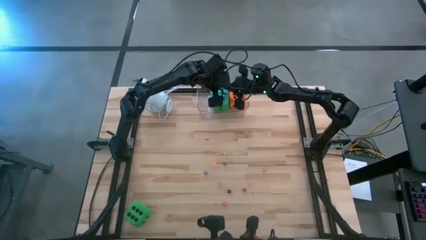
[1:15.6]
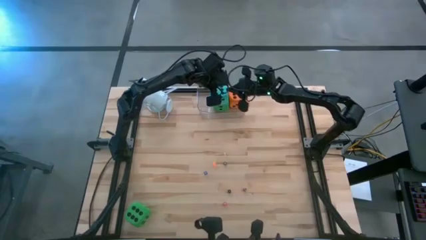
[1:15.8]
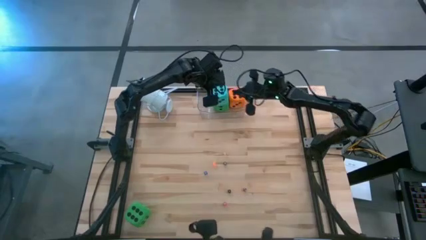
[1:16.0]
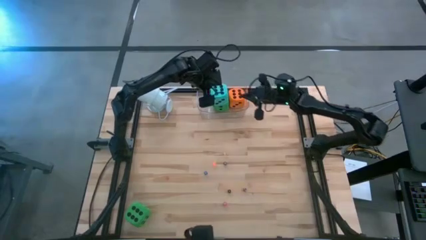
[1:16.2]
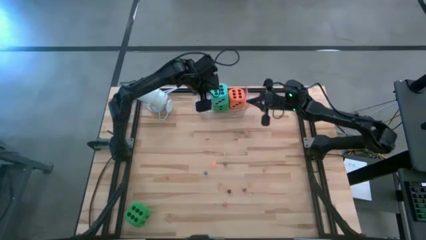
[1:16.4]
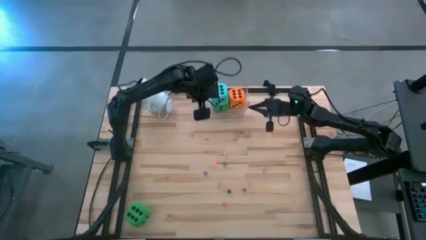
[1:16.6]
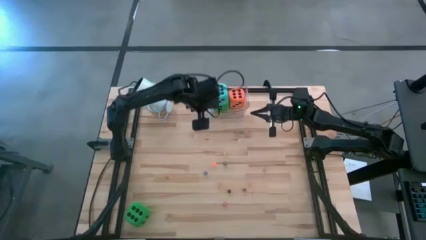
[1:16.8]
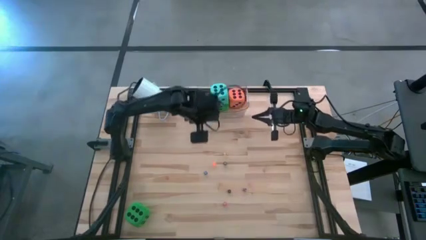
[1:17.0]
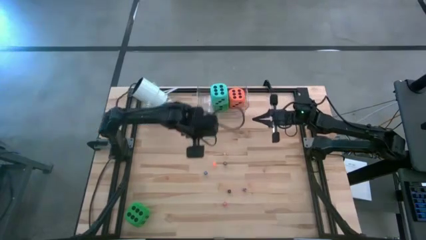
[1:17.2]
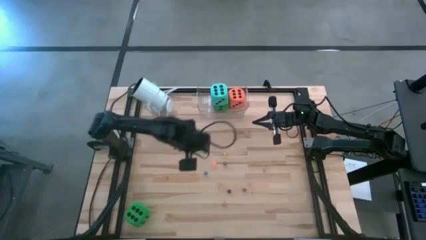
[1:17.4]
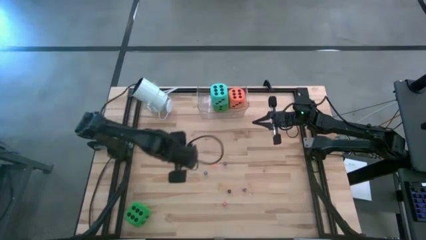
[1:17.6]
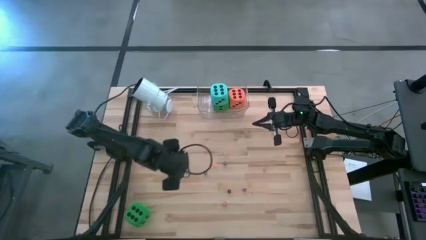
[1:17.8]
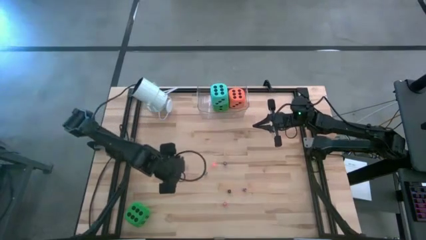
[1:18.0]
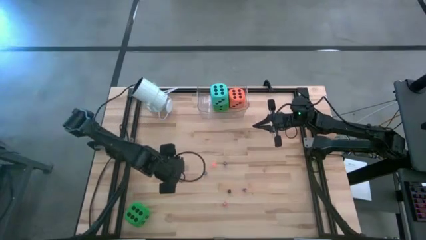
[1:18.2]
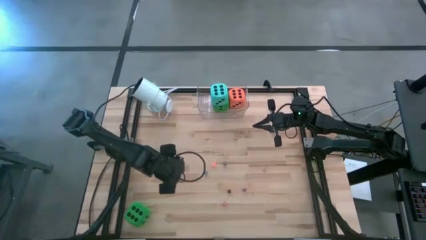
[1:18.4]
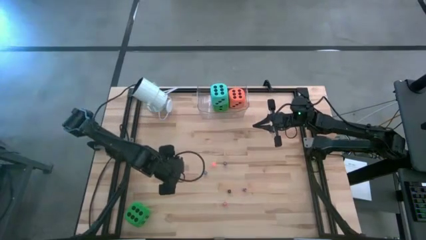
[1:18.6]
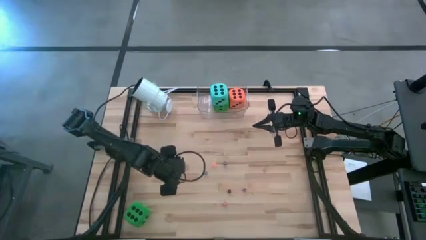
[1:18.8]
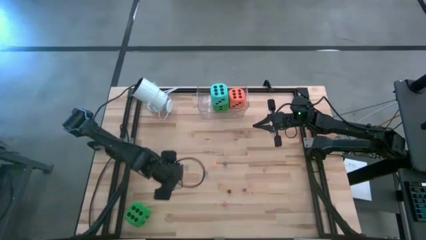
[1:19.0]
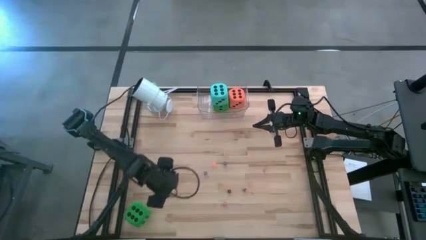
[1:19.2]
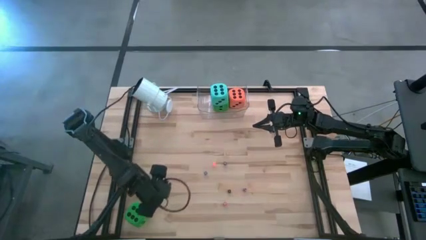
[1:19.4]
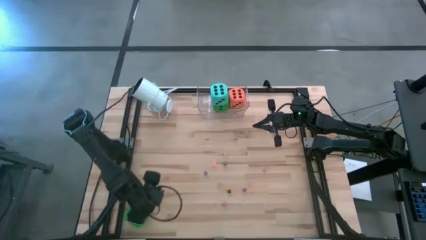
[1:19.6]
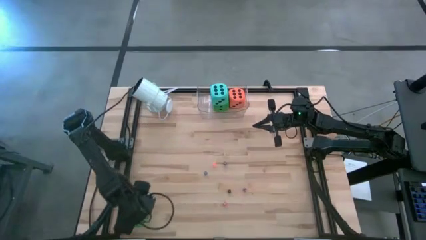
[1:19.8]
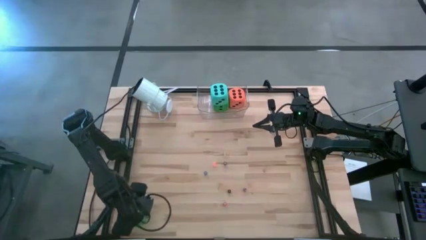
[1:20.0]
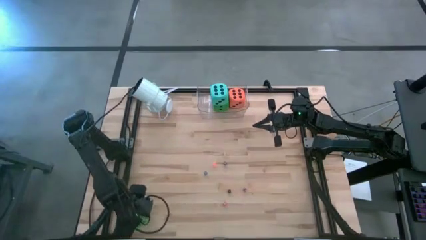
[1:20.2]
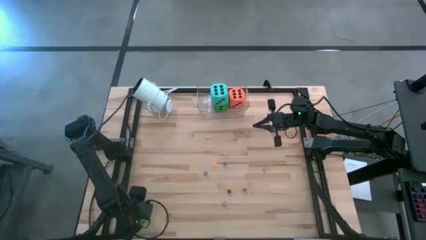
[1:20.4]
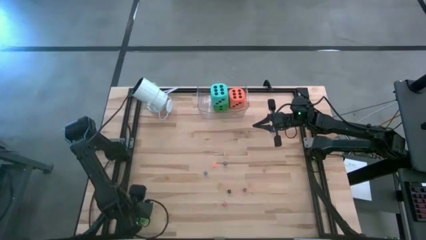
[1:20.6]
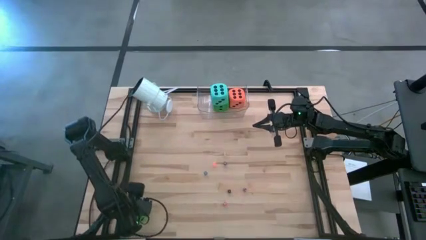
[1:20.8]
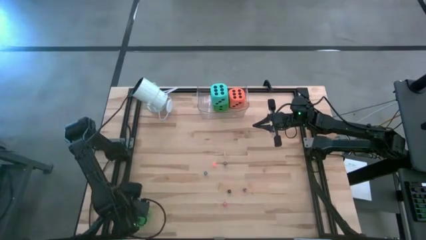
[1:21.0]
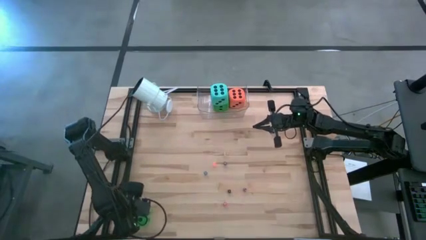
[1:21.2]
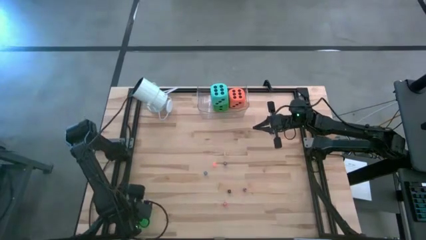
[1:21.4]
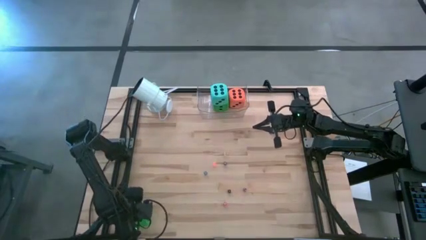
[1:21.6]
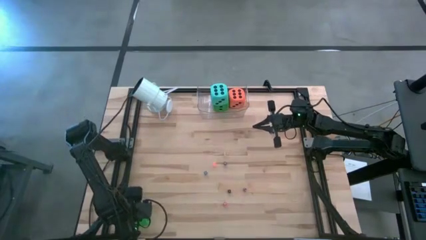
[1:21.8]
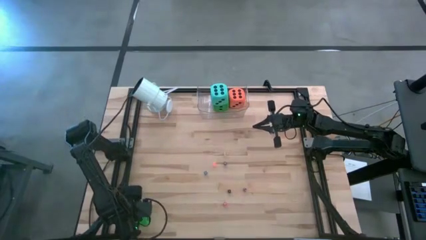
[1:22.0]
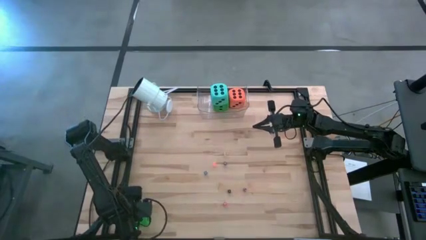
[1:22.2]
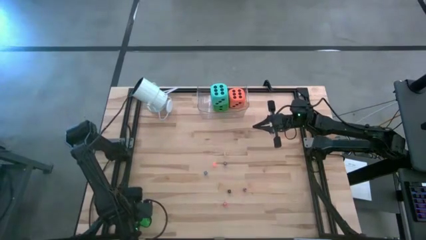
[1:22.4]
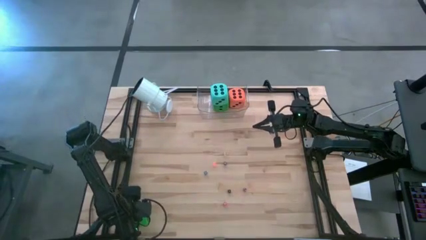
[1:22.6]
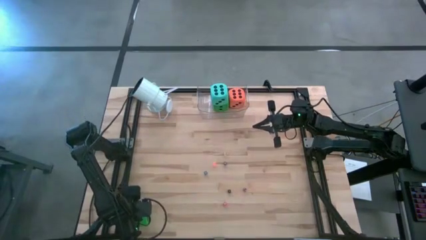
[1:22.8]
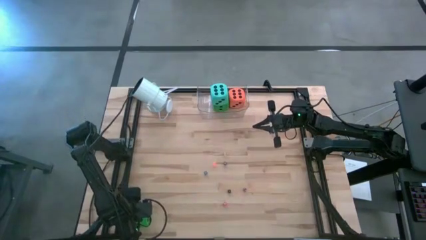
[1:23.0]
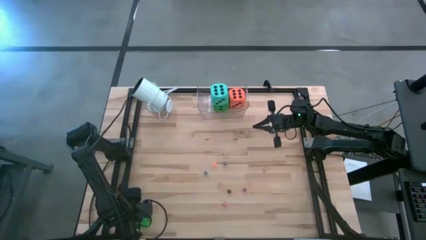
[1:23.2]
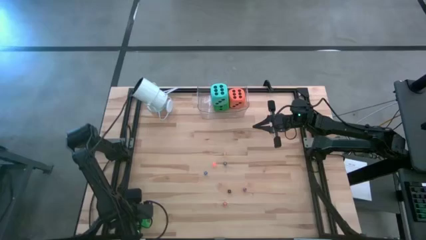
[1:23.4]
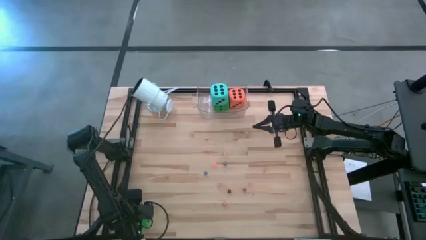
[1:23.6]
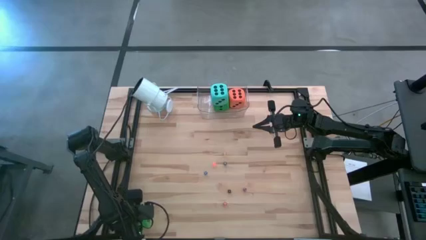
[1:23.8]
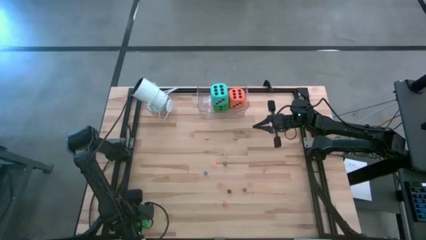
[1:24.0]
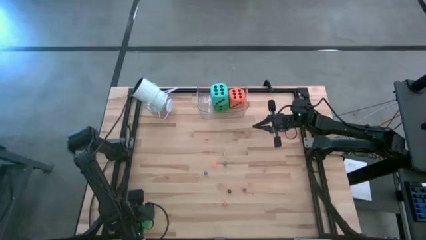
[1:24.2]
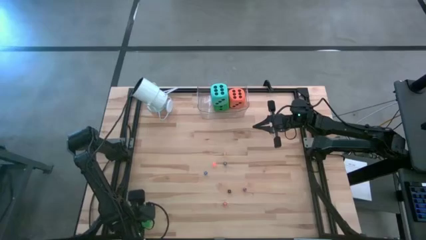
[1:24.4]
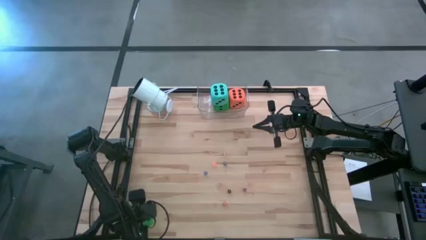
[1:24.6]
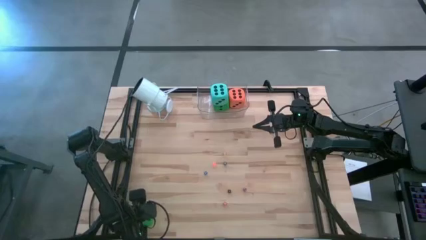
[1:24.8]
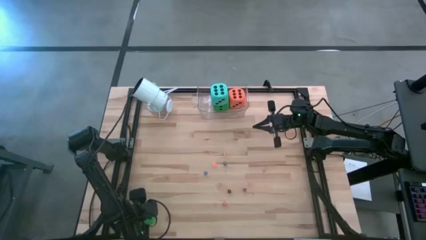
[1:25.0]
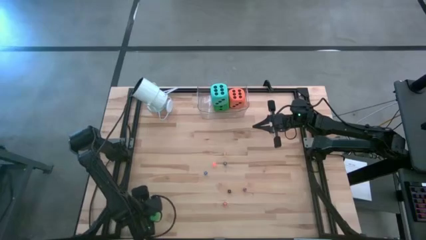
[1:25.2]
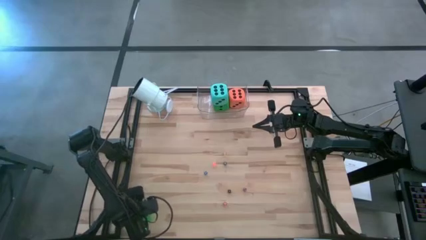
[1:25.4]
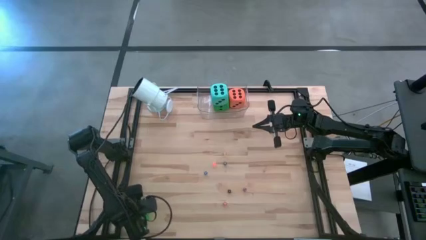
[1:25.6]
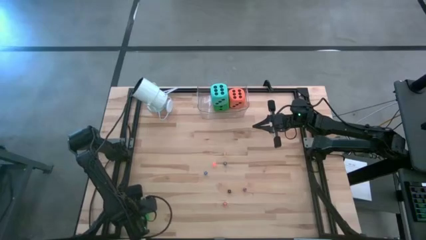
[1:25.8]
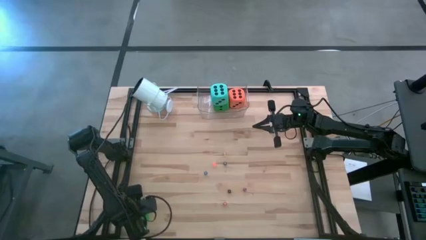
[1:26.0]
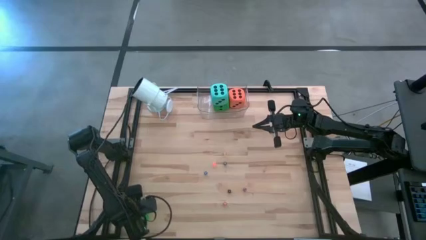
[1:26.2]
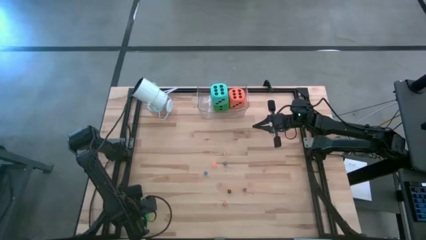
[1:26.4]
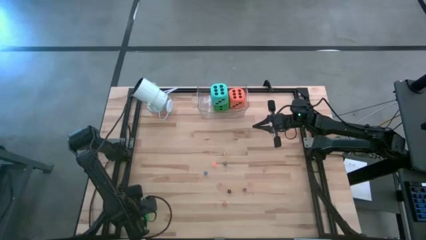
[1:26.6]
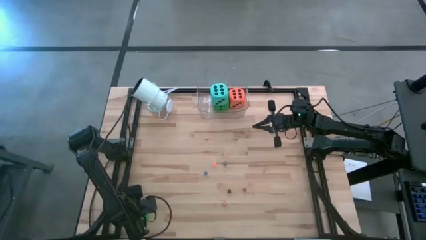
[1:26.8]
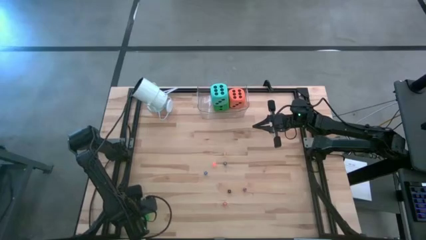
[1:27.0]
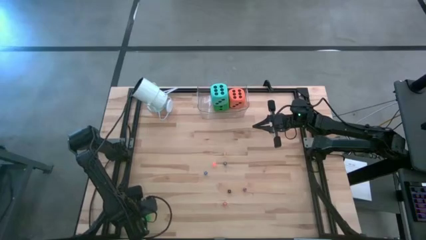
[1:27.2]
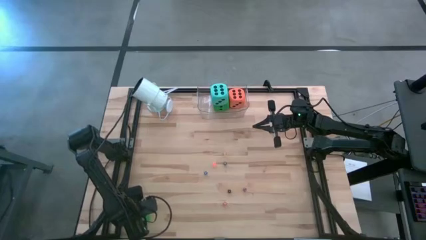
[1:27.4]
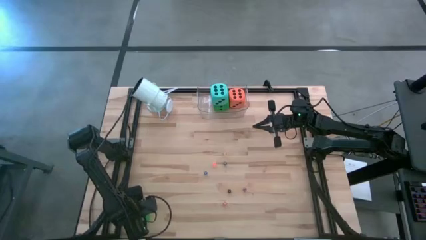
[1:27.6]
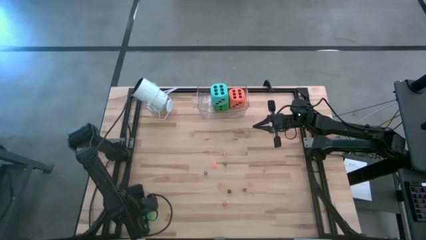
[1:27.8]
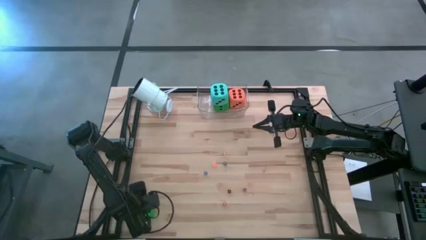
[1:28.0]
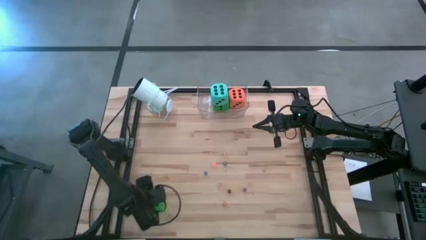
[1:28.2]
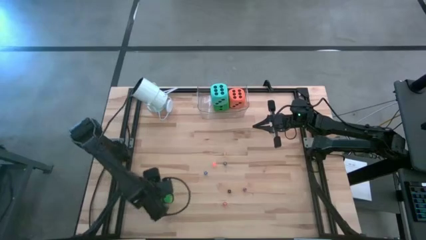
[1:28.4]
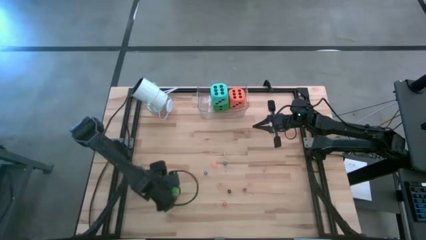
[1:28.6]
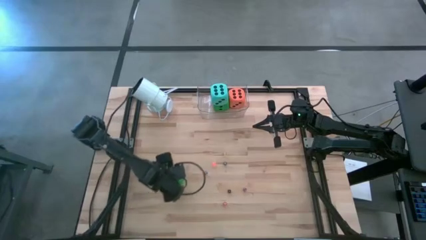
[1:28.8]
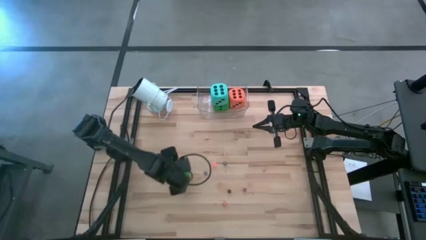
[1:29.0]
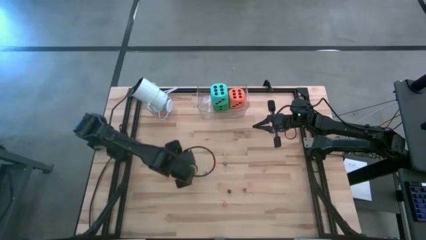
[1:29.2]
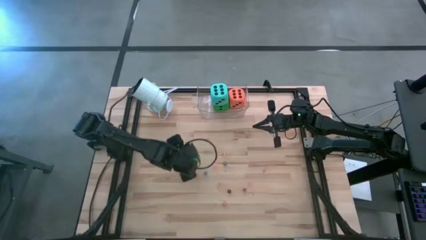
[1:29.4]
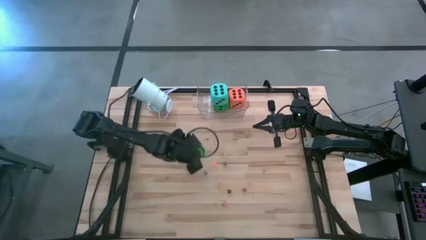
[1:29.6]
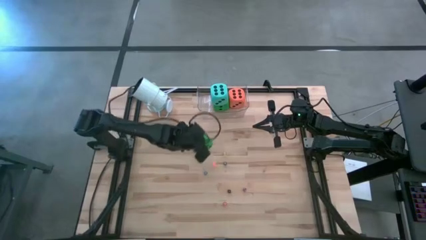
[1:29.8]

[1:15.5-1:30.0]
Task: Pick & Place Dice
Put the big green dice into the transparent bin

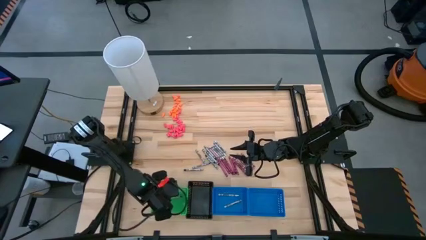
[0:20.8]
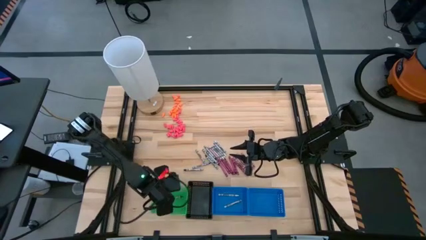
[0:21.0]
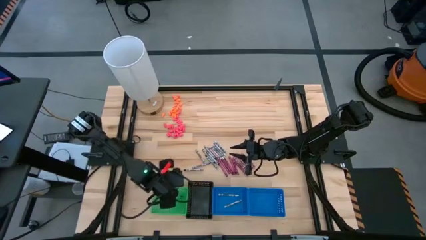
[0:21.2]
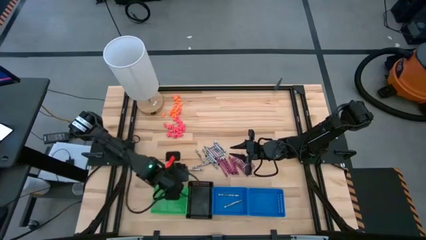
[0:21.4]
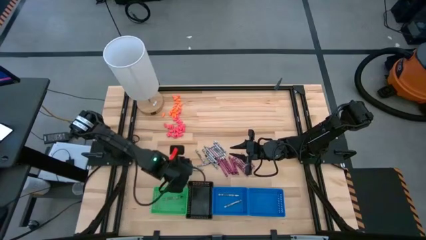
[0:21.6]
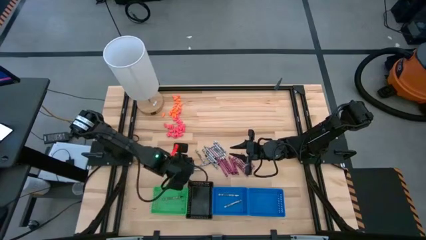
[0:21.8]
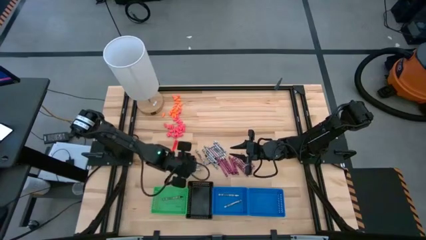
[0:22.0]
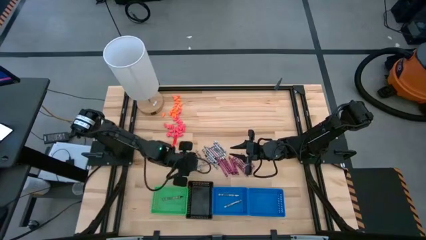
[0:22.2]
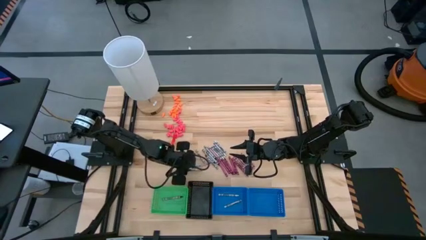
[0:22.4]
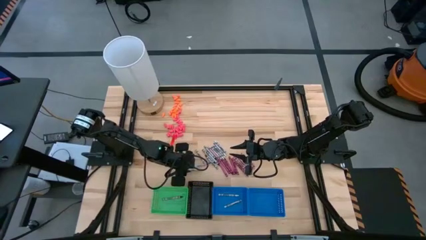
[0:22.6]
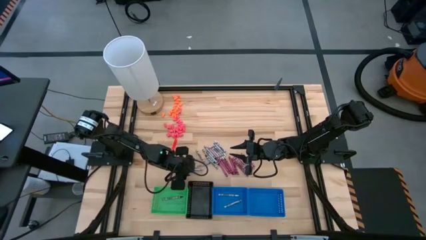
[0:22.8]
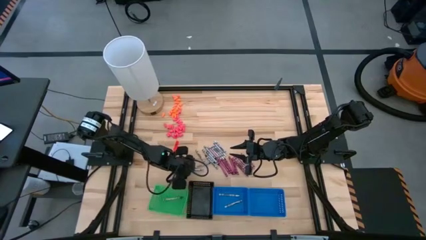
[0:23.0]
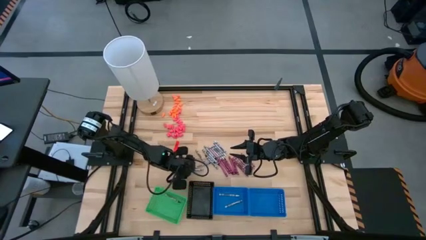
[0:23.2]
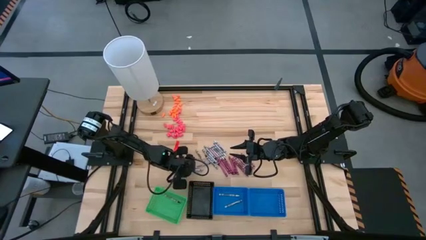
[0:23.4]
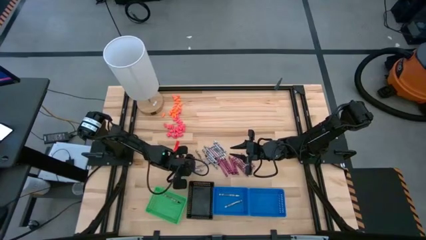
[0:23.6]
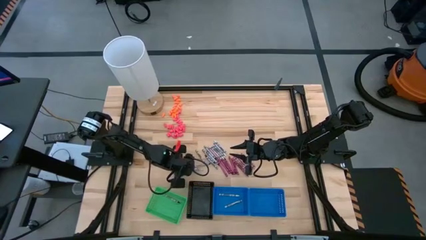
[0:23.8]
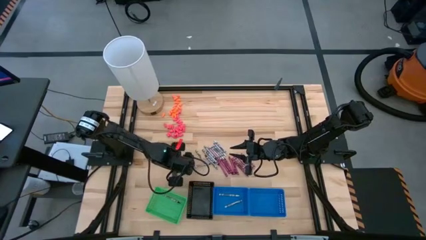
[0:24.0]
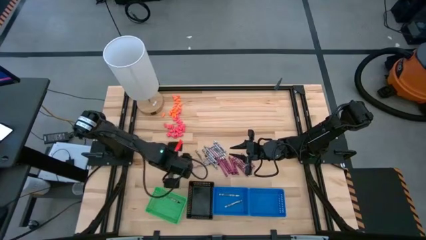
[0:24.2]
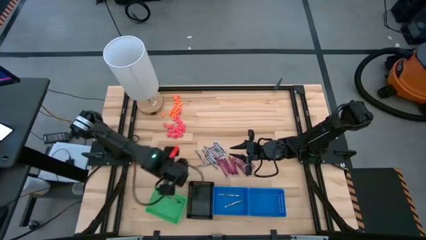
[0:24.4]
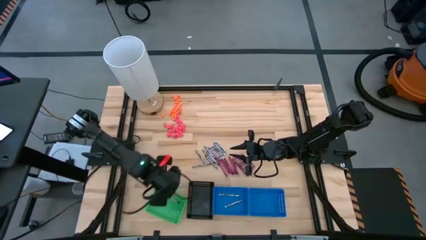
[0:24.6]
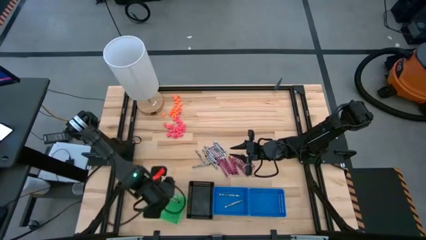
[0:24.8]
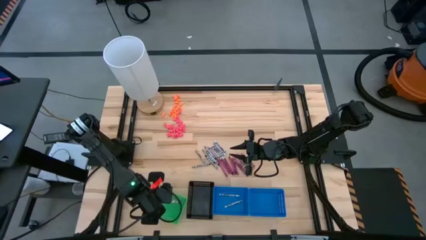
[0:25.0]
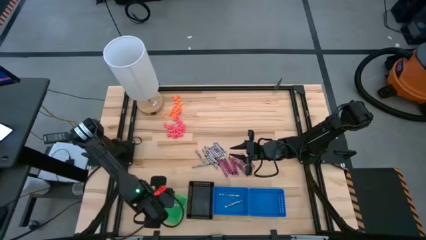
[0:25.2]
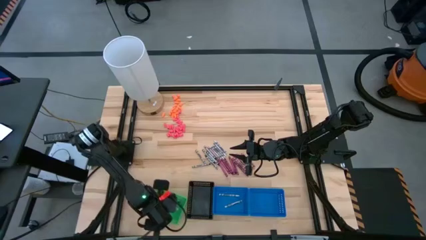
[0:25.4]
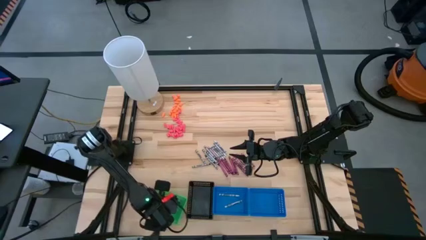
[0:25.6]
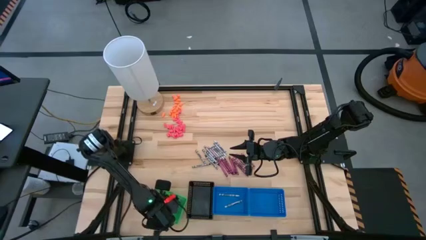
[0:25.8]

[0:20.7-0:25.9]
Task: Sort crayons
Put the black crayon into the green bin
